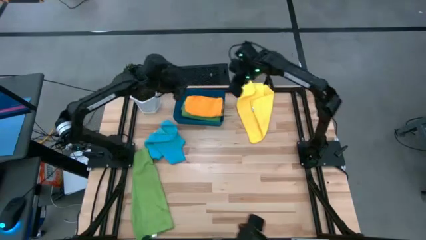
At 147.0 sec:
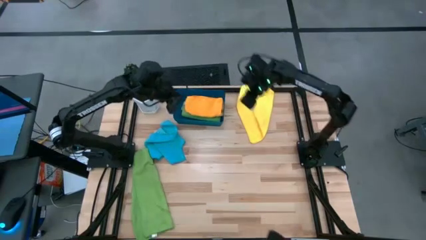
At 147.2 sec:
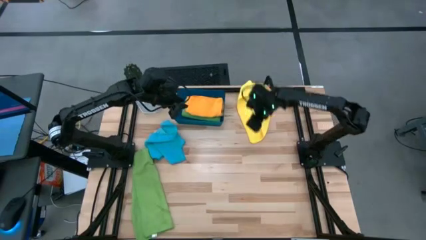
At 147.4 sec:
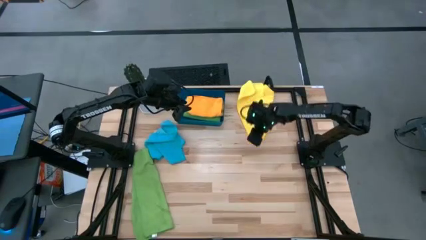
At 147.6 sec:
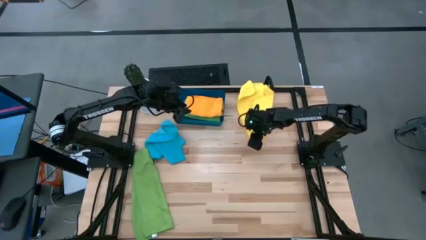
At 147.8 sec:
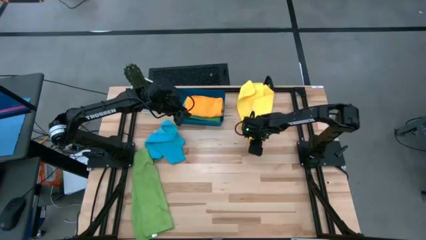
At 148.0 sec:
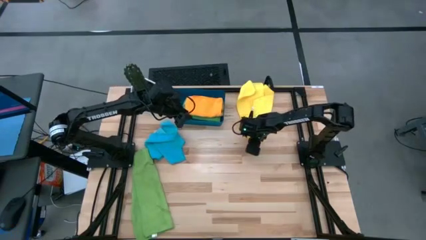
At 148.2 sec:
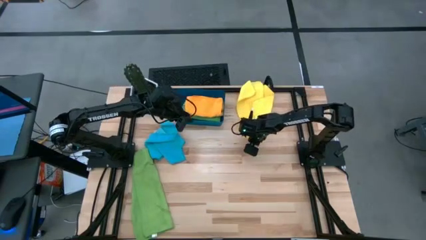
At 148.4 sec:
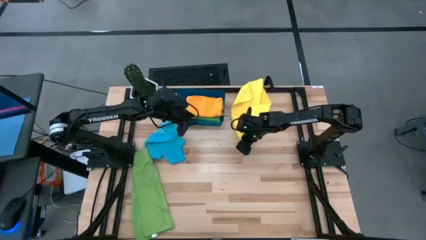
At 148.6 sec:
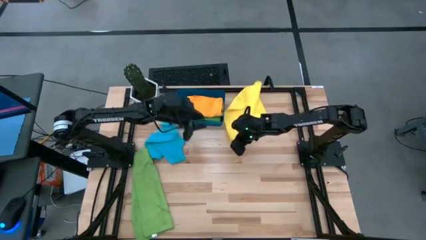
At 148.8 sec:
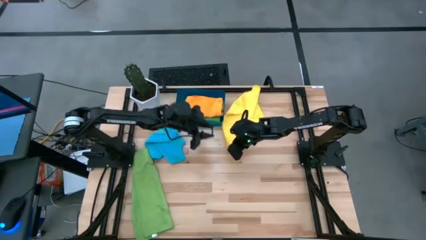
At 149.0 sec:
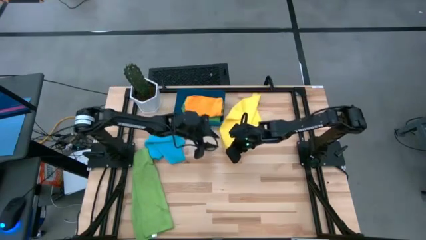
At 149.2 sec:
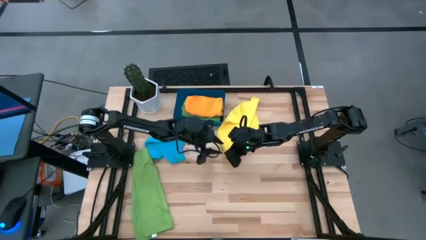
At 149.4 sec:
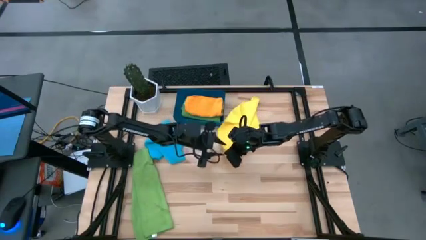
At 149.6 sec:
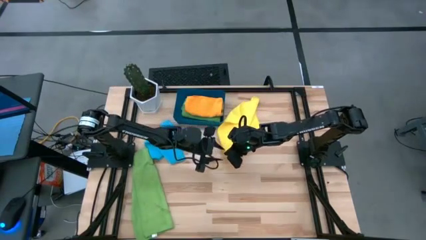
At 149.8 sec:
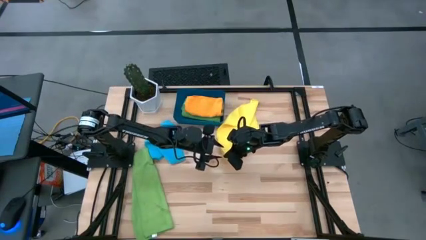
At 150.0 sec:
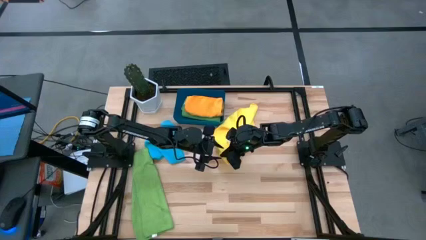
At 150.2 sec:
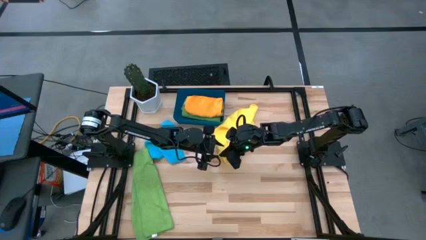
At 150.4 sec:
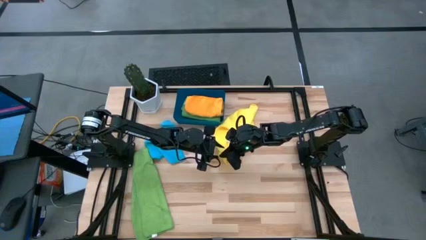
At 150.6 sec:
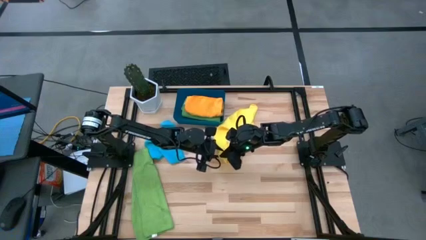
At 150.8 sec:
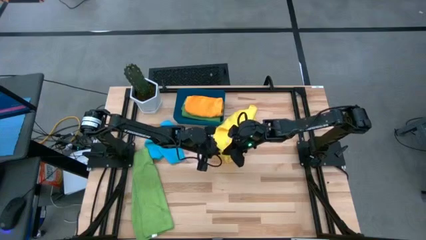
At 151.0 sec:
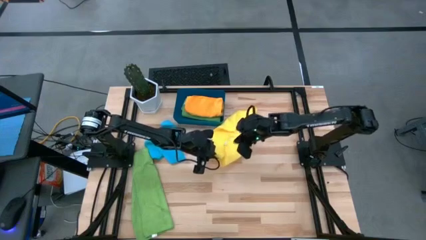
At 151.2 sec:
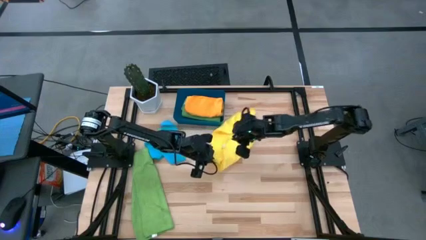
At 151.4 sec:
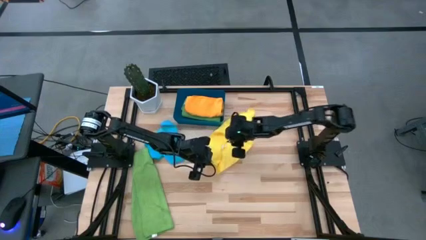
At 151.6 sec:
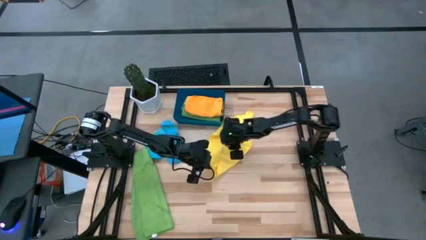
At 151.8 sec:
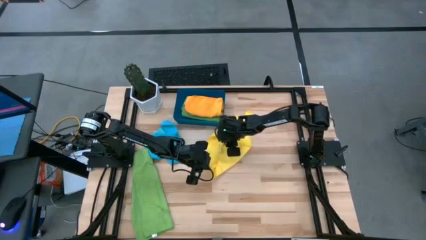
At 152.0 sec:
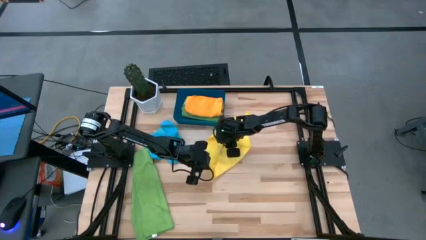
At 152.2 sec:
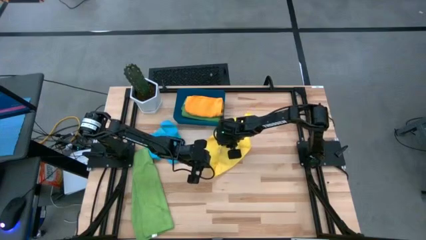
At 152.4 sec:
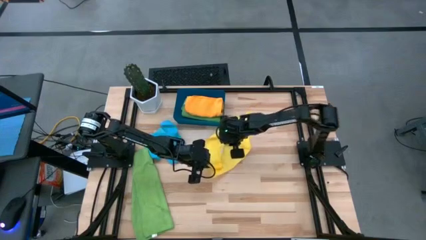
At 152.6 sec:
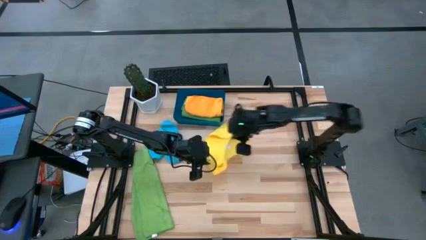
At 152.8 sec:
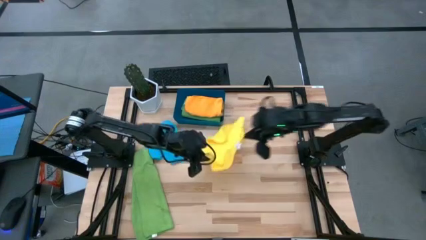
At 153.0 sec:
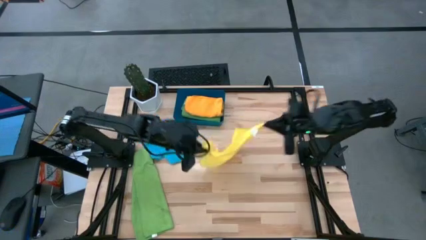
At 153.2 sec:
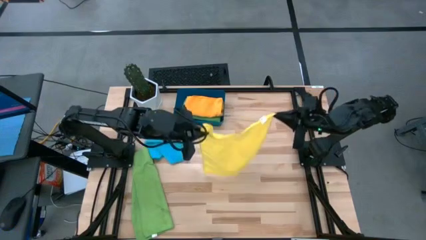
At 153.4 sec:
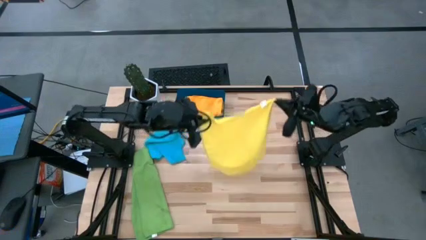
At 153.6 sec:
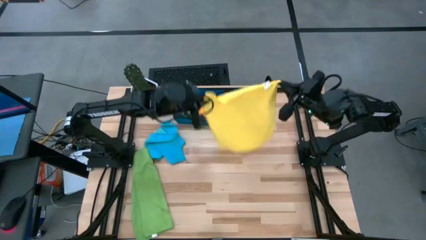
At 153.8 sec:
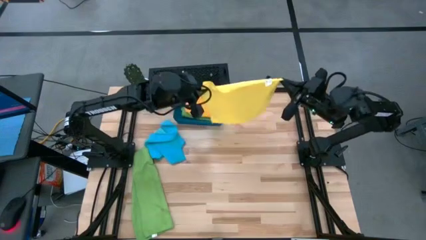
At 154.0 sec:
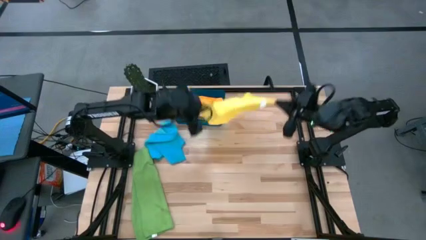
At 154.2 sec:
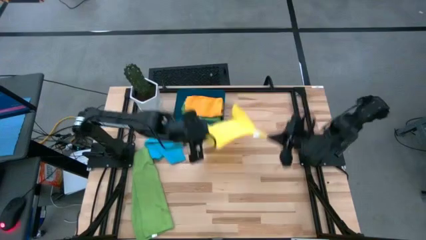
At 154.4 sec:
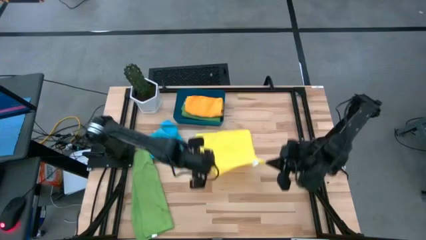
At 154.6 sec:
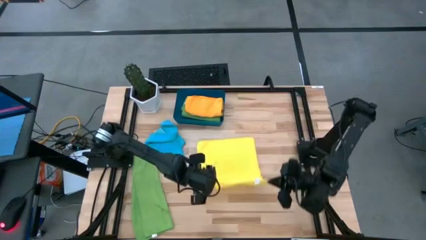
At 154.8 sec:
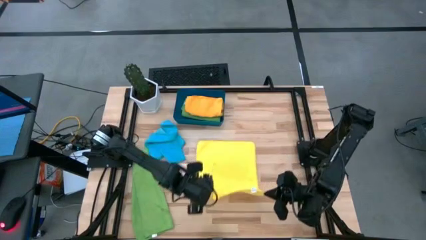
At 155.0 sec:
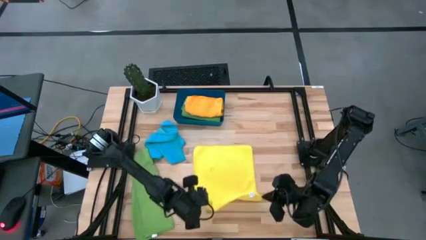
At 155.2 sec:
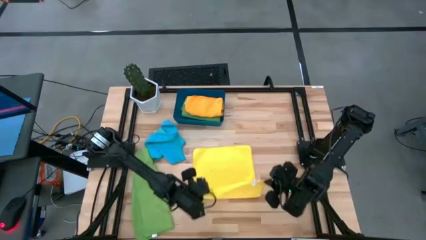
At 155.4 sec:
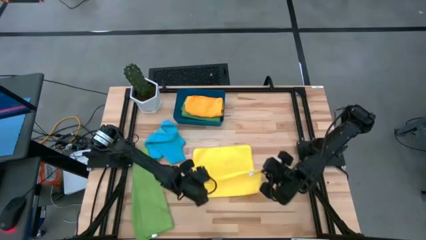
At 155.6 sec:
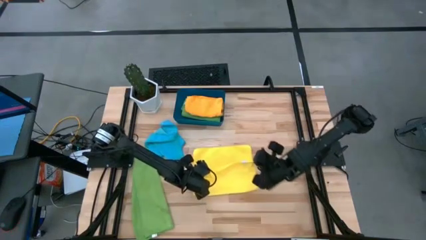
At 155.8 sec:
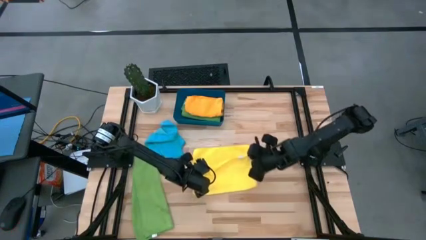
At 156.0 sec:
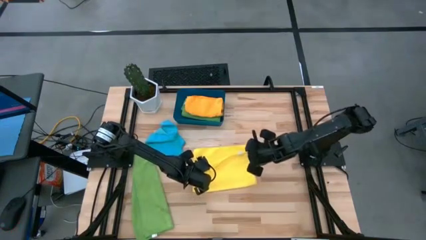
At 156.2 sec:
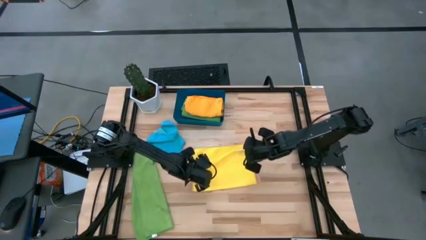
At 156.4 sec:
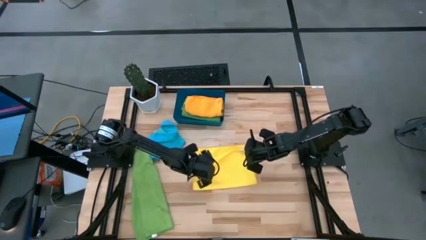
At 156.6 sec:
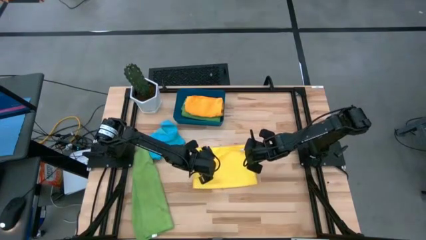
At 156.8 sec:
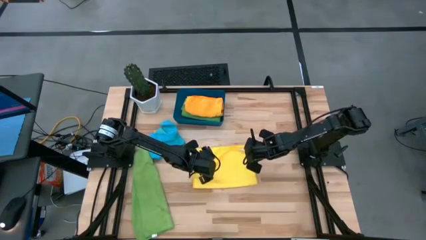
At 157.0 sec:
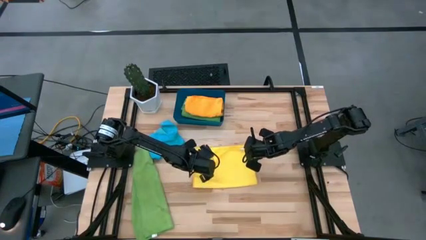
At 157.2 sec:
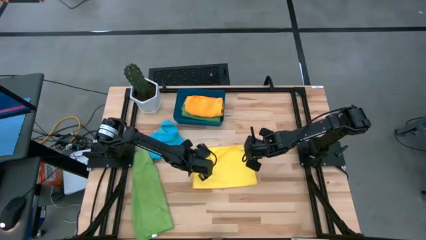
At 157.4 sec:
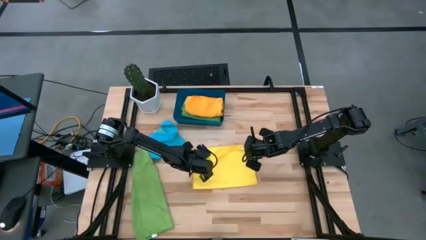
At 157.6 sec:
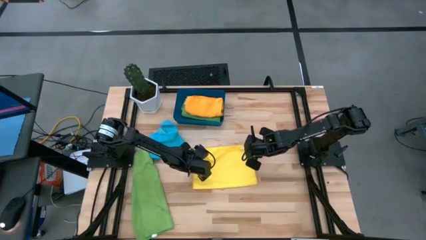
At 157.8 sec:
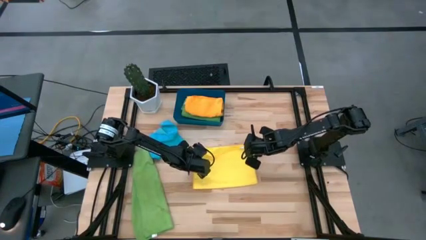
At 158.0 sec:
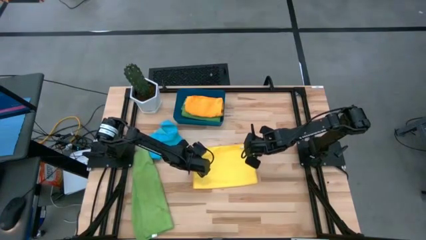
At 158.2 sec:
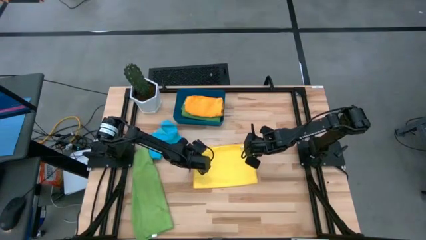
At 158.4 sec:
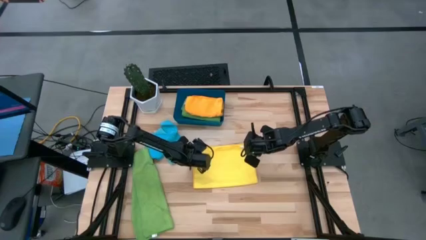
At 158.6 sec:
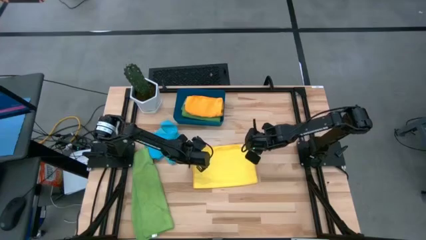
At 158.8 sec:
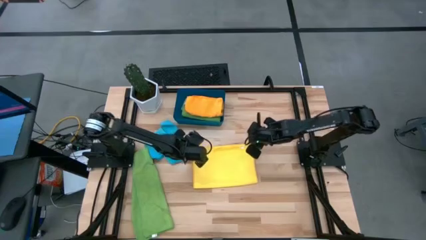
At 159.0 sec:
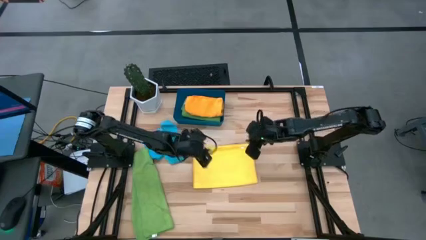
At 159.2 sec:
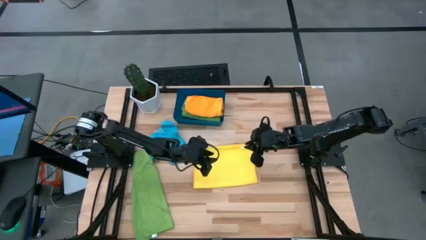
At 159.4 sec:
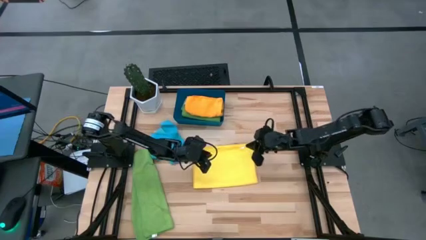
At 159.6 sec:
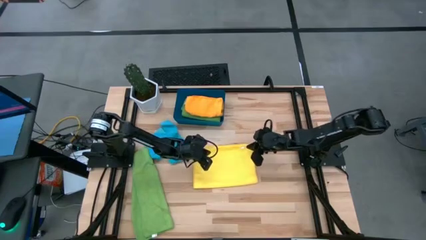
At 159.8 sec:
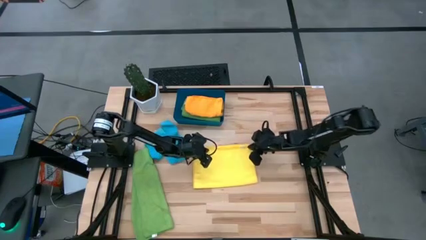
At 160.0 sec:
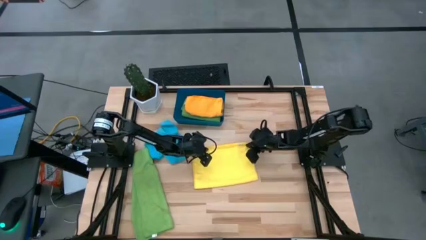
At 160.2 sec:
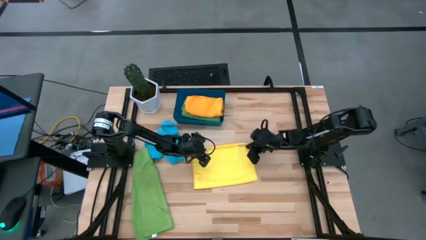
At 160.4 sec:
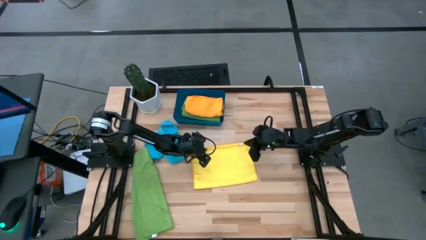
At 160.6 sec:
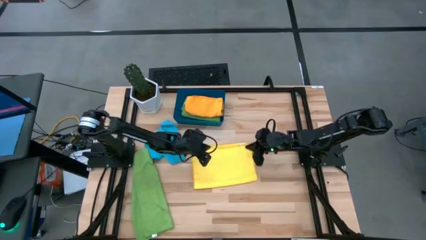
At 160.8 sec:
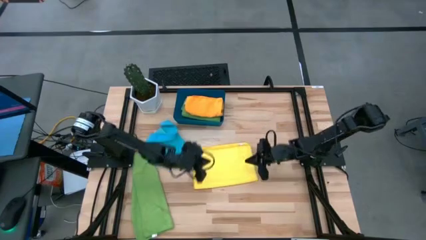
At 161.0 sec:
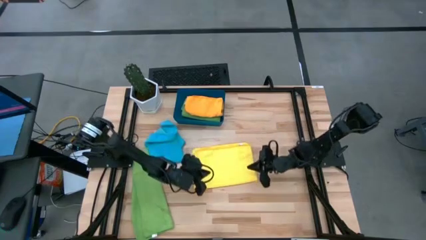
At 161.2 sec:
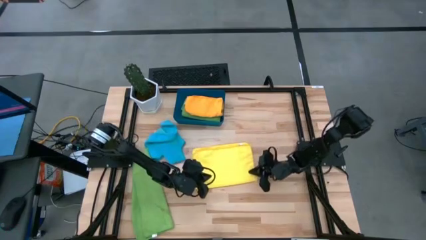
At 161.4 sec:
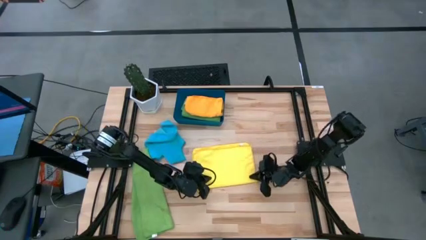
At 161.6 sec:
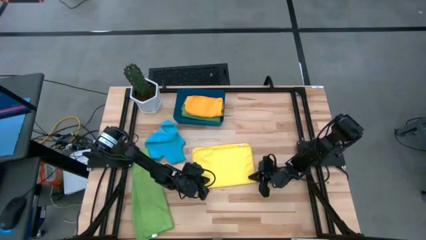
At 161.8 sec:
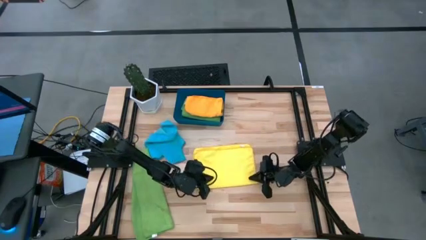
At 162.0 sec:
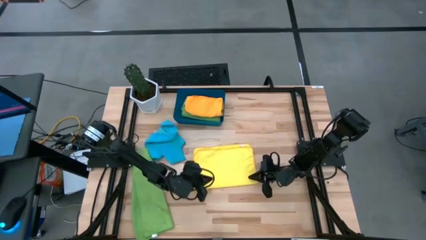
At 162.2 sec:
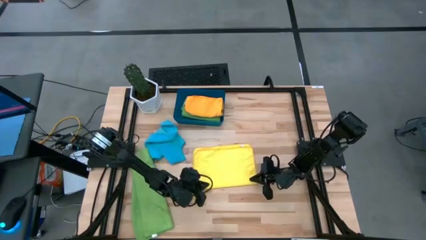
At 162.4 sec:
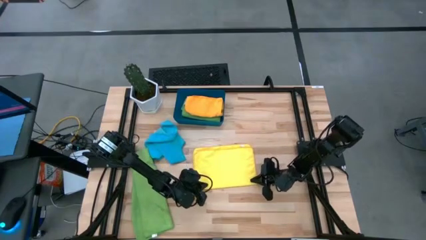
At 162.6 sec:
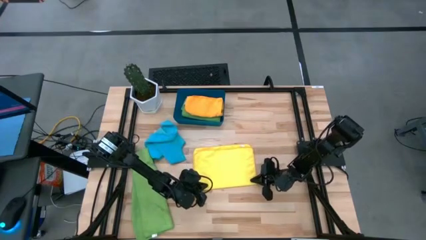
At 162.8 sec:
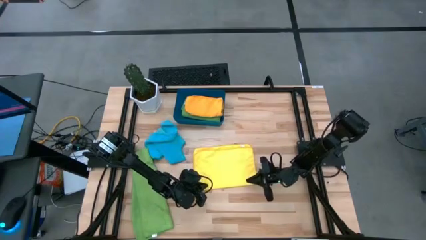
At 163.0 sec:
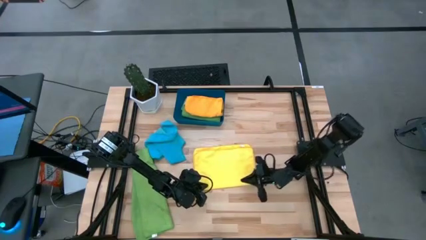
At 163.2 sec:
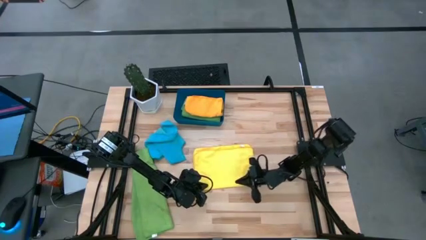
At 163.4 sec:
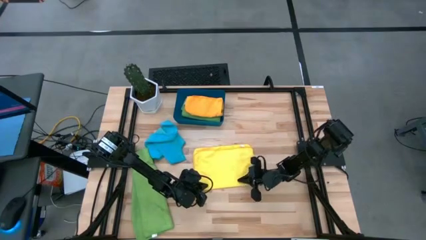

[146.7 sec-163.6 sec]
Task: Fold microfiber towels
Fold the yellow towel
